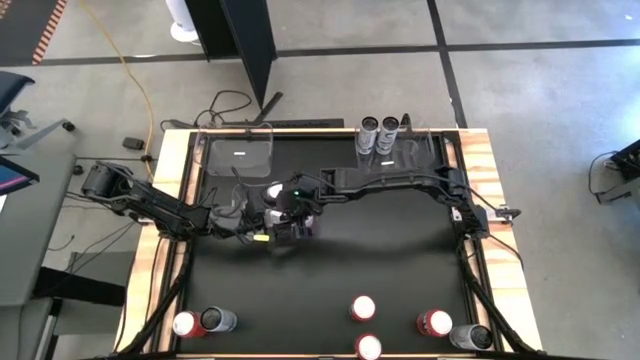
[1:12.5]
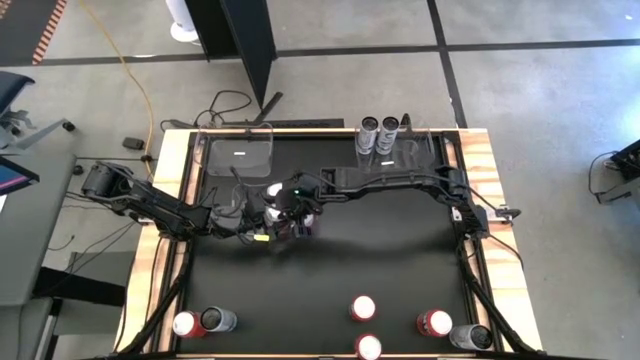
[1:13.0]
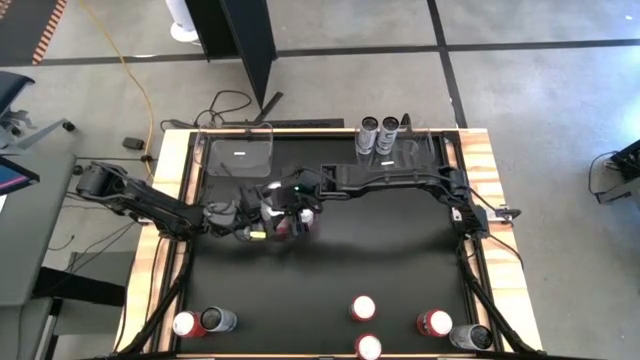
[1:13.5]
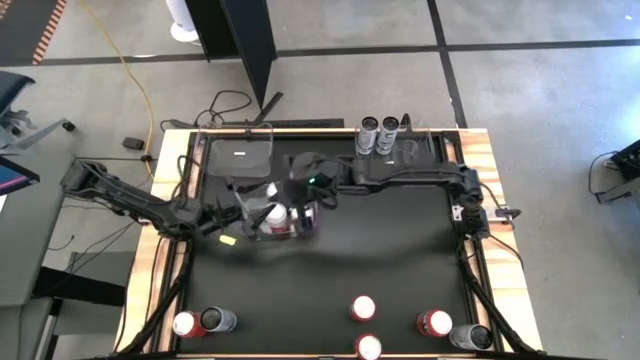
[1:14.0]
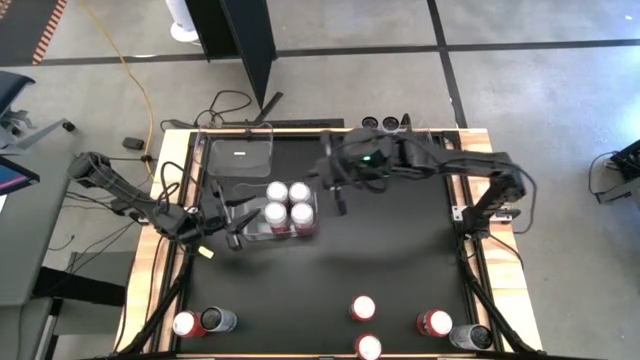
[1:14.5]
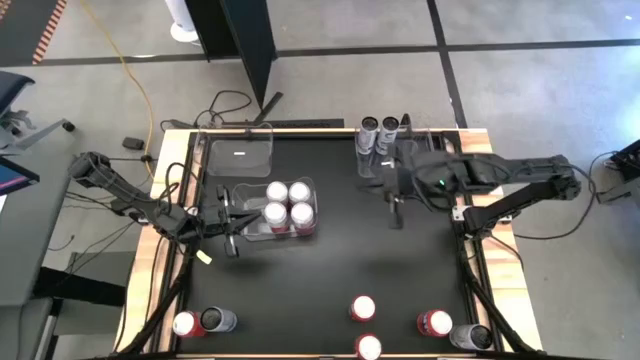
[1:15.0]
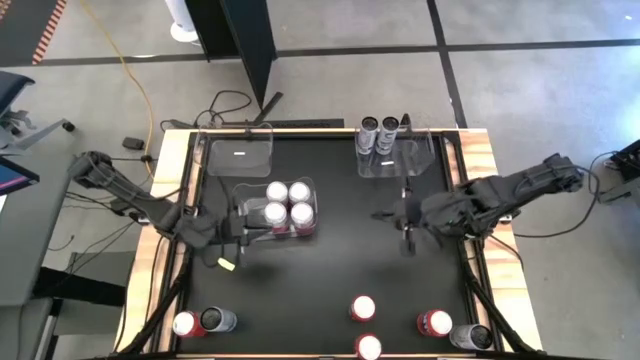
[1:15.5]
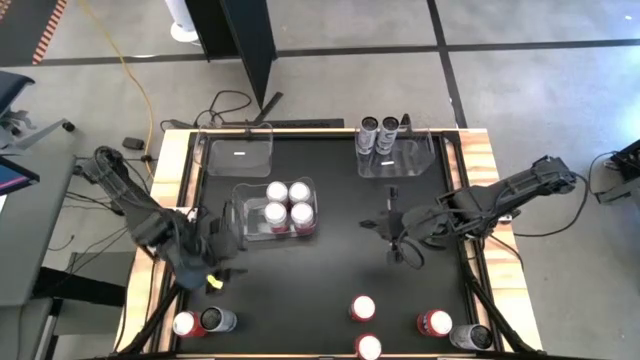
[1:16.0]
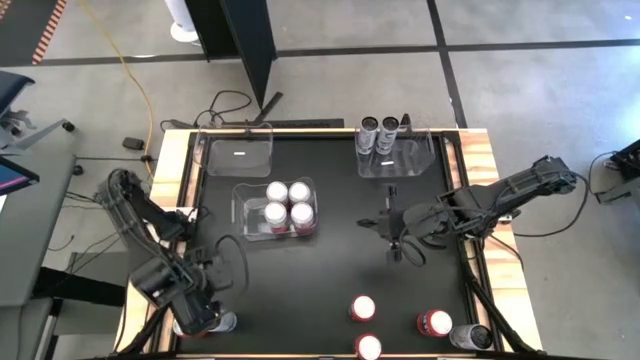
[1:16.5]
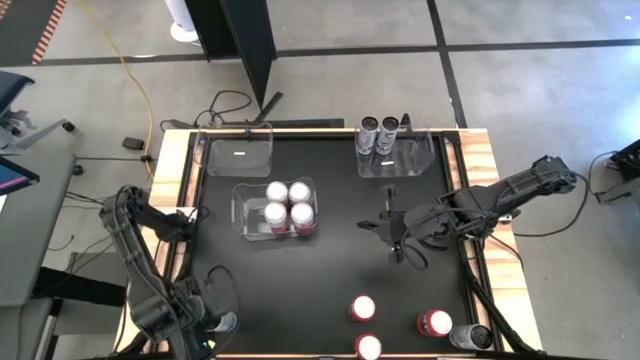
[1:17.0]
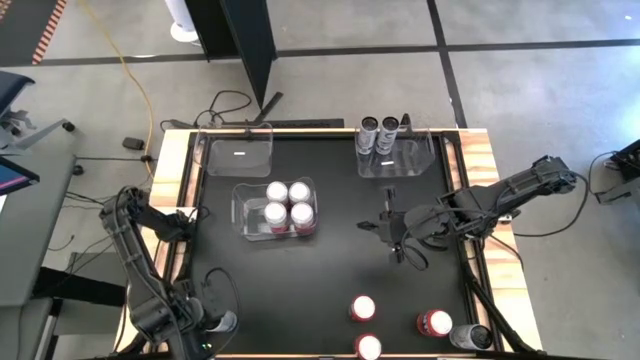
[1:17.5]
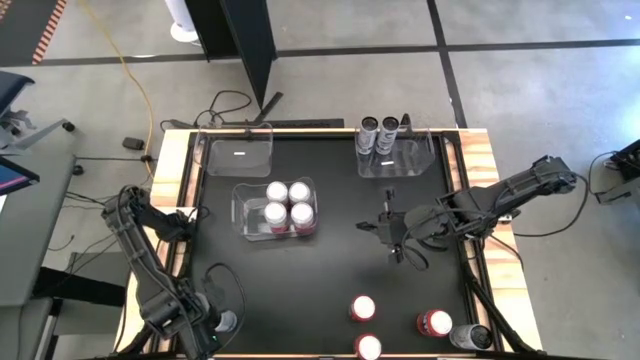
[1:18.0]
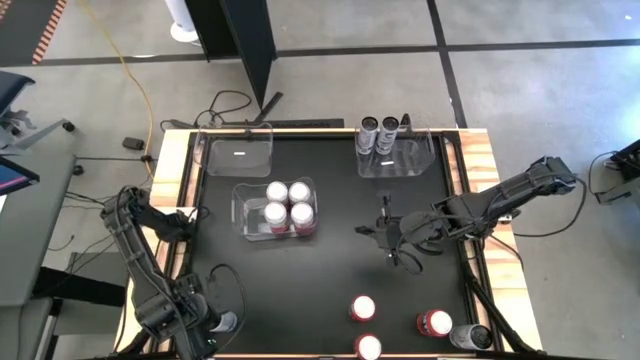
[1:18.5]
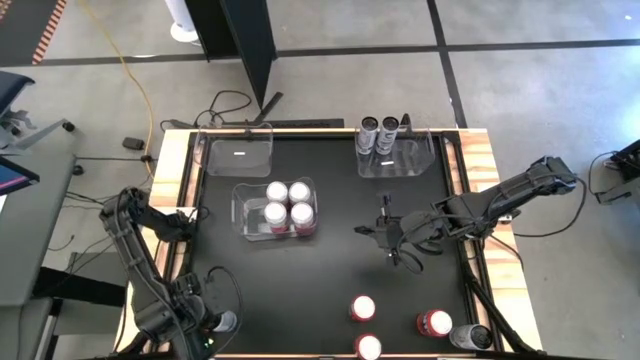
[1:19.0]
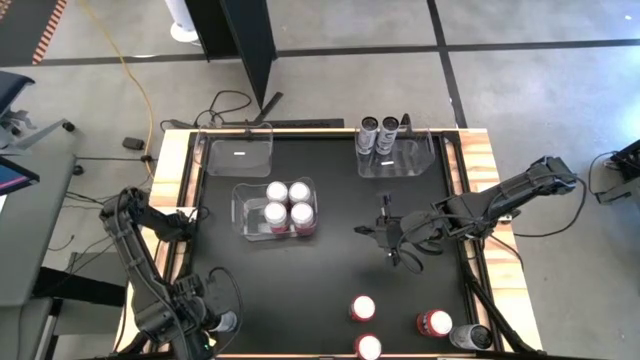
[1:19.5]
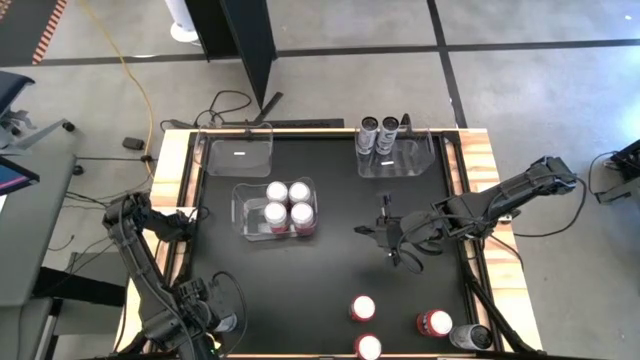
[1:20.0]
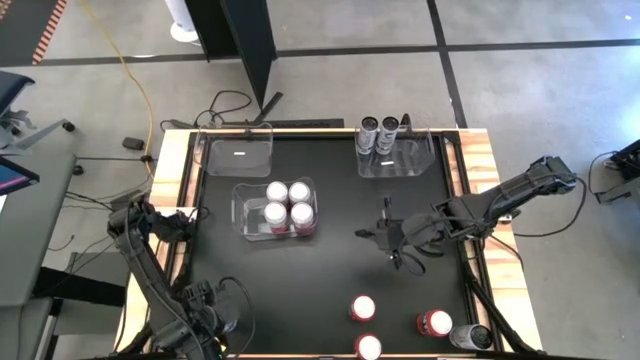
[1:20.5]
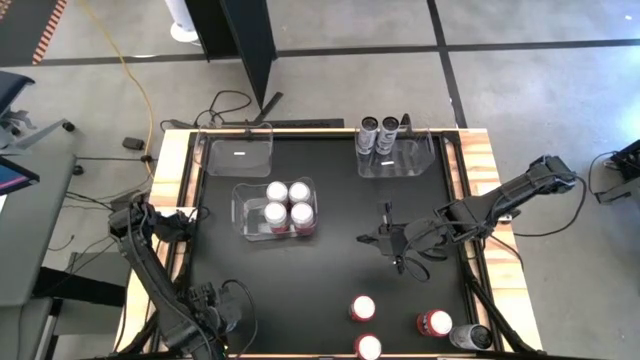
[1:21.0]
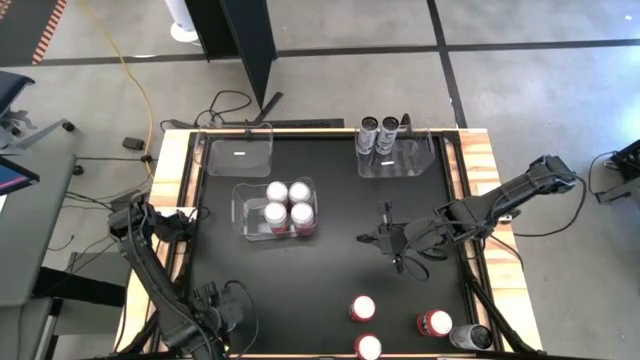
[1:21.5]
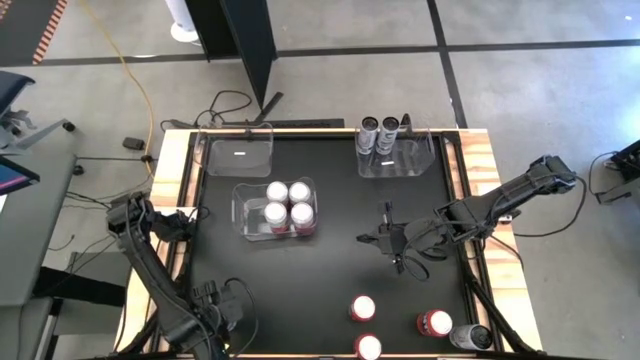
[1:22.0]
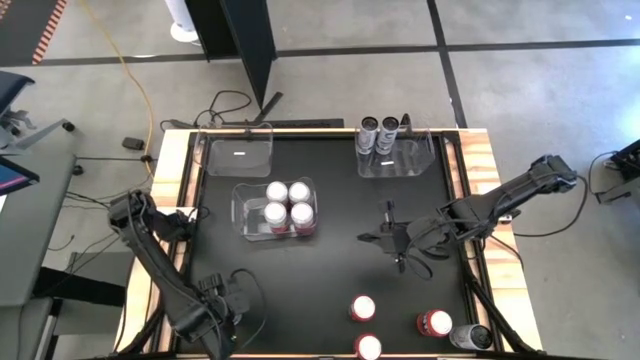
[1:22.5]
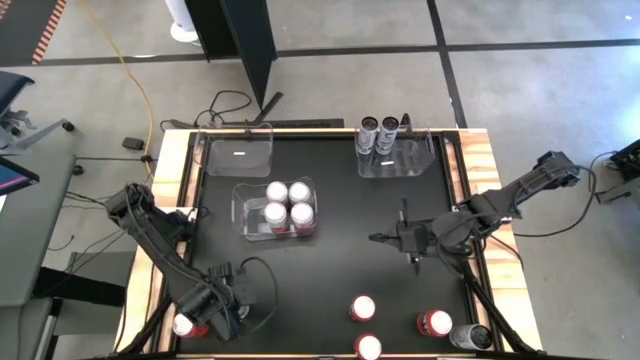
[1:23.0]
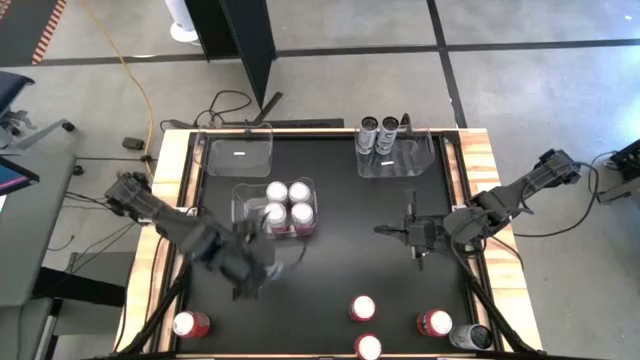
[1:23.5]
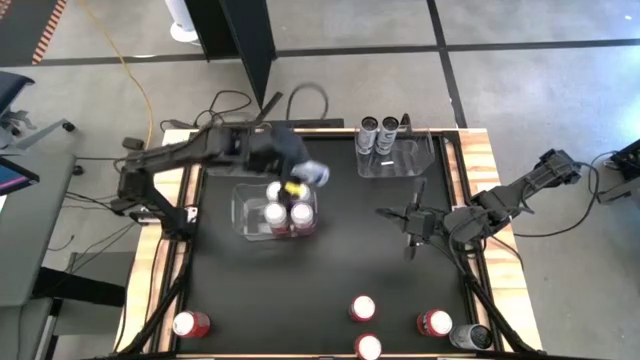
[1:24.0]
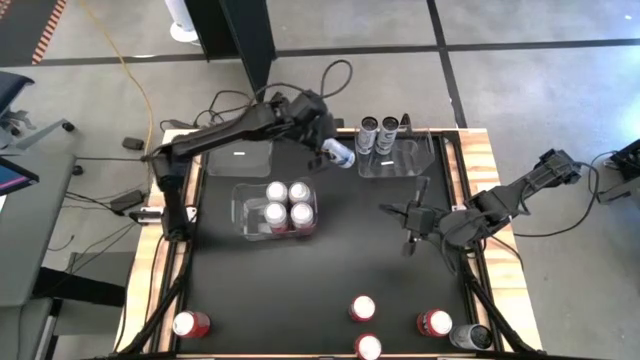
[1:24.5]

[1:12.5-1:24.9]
Task: Sort soda cans
Put the right white and blue soda can into the right transparent bin

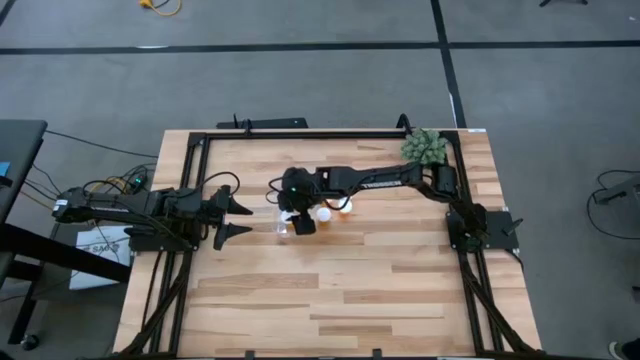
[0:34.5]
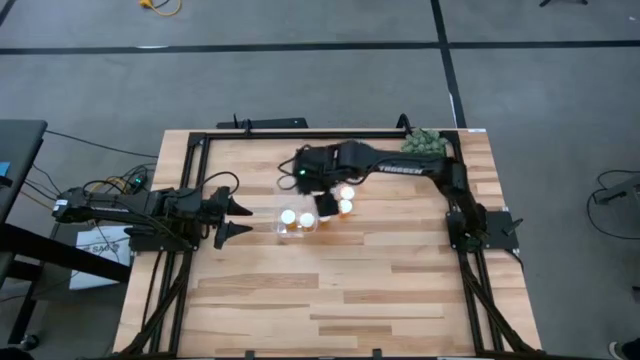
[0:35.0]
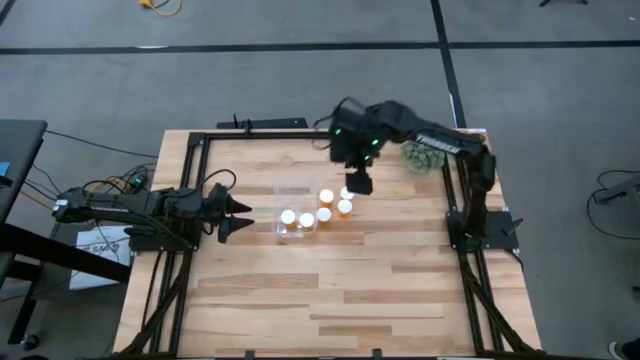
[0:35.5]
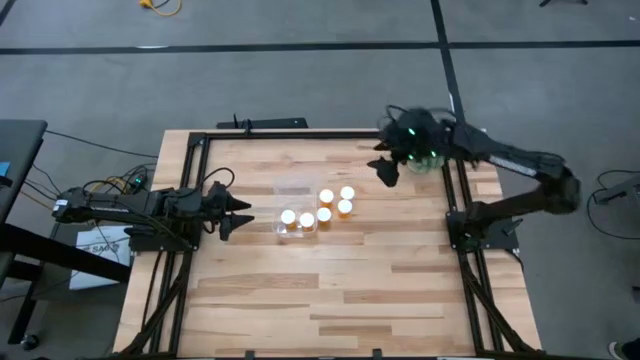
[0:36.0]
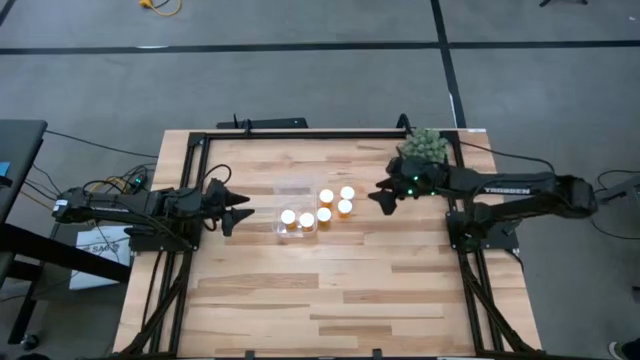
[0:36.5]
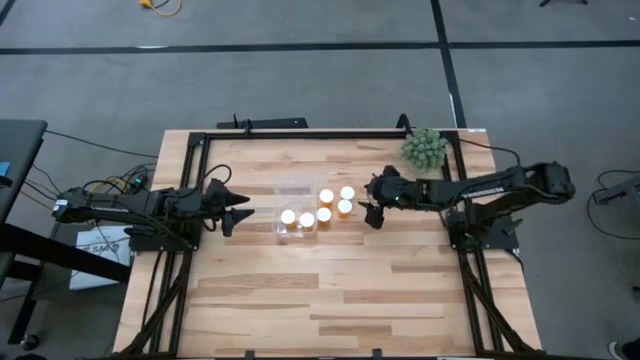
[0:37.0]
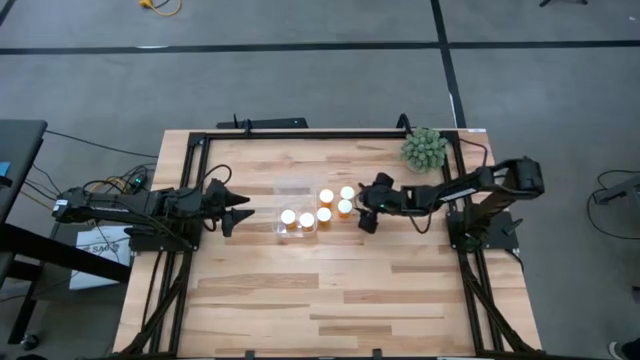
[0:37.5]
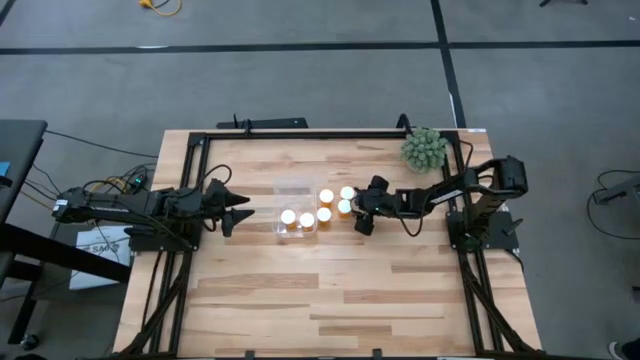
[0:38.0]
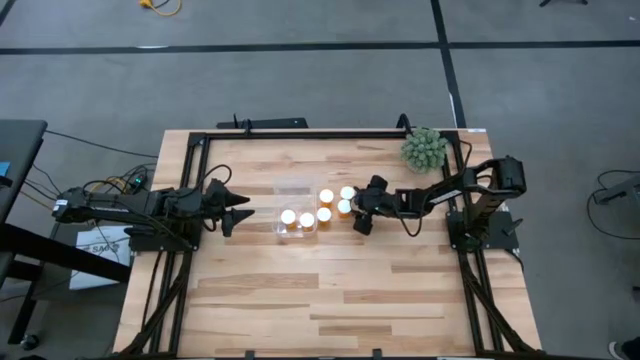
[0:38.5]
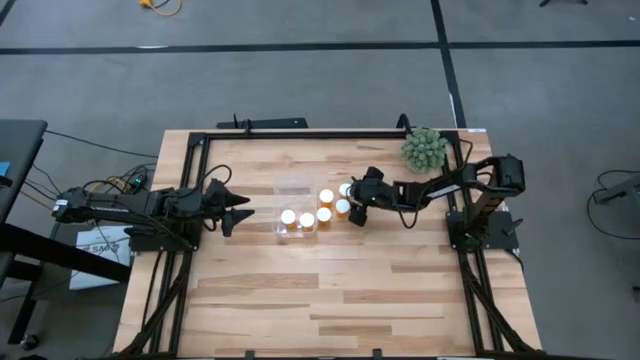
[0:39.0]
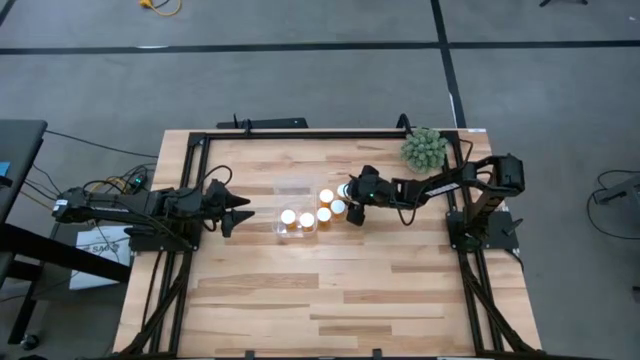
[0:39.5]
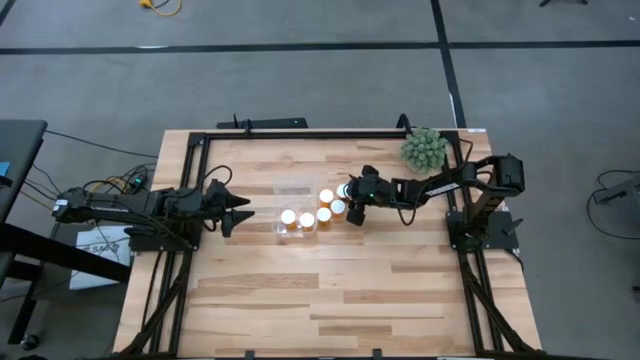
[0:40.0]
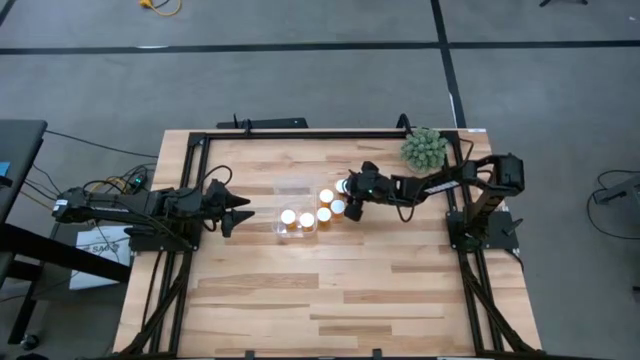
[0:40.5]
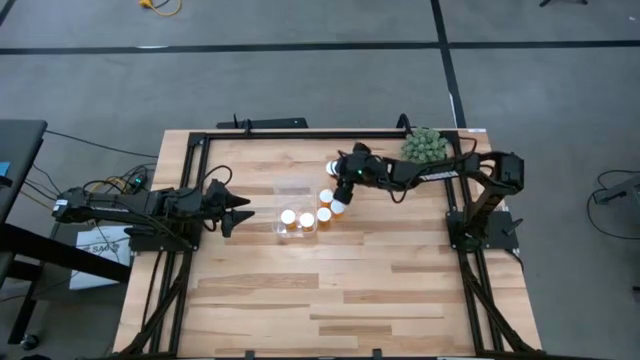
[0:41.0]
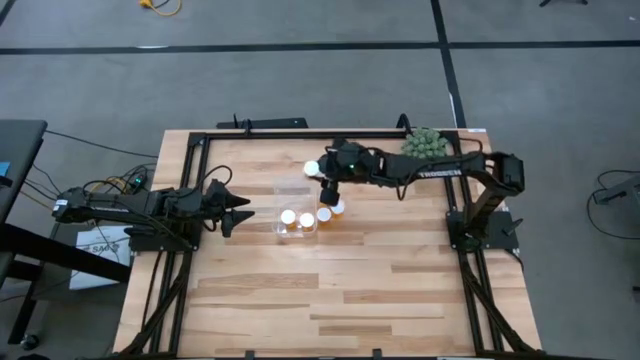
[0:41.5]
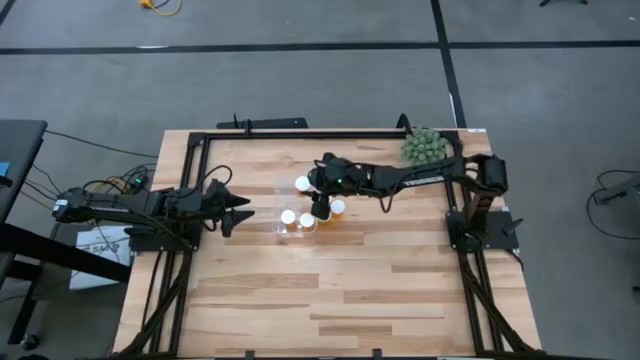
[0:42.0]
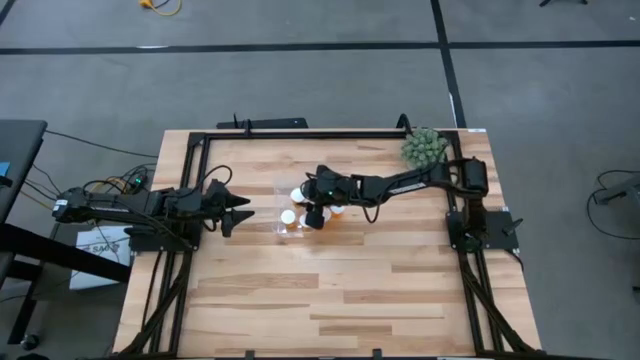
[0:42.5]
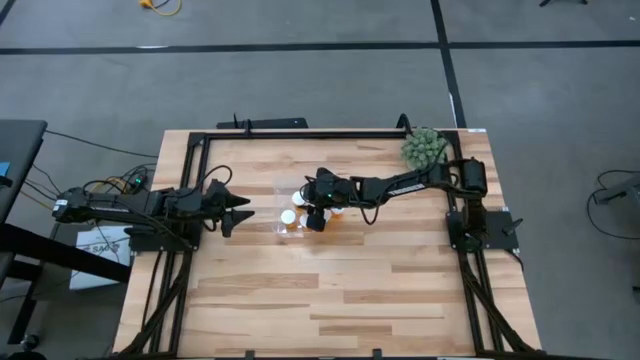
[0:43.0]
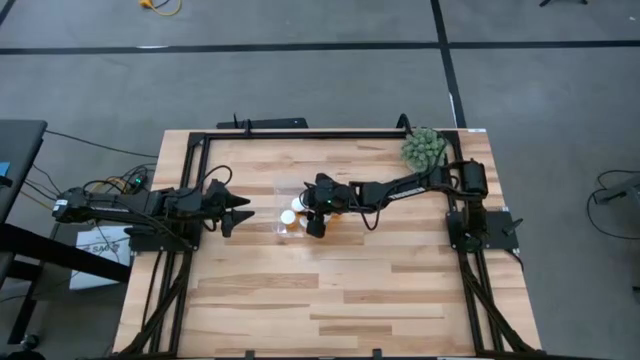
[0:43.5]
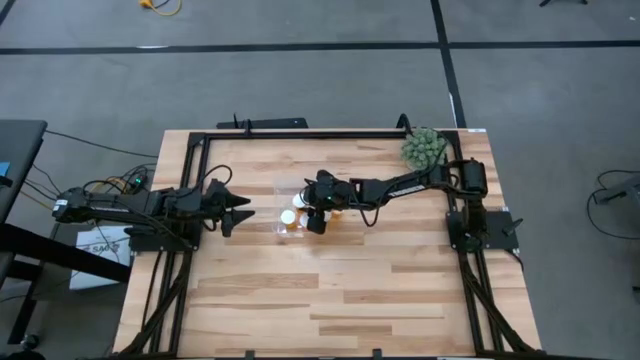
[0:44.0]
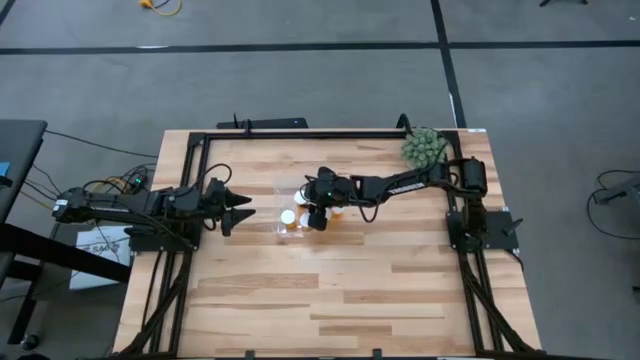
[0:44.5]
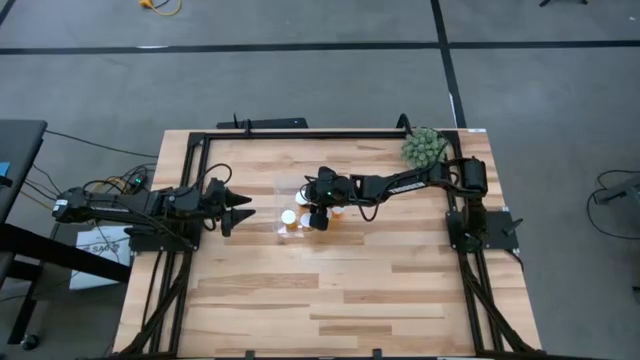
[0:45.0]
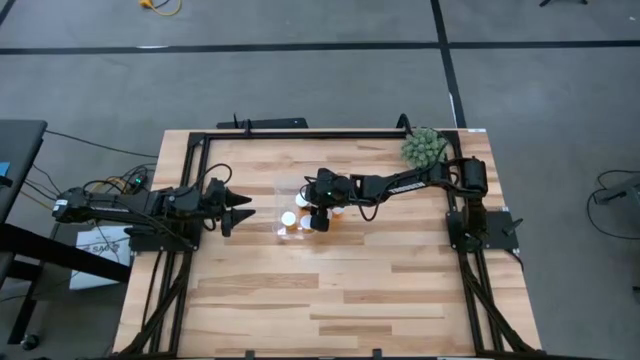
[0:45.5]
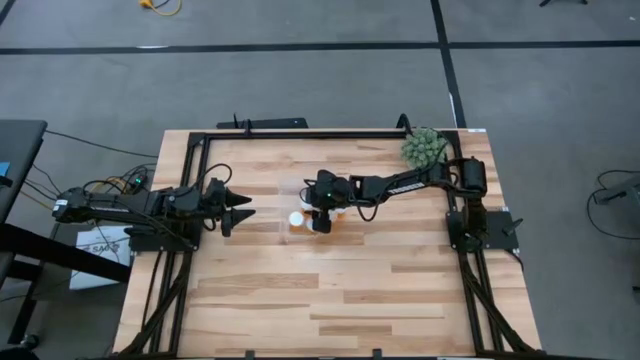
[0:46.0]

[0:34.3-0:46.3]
Task: Pick and place pill bottles into a basket
Put the orange pill bottle into the transparent container
